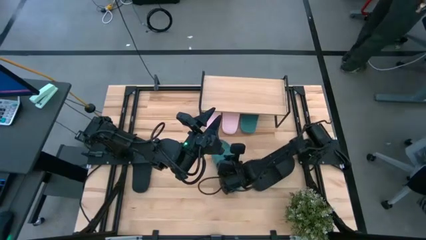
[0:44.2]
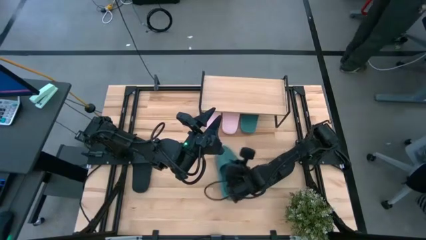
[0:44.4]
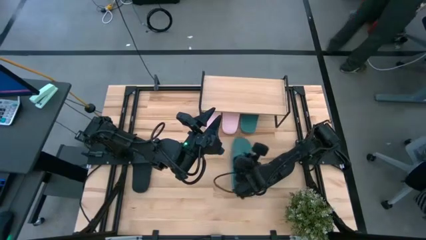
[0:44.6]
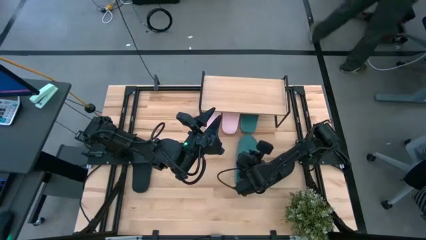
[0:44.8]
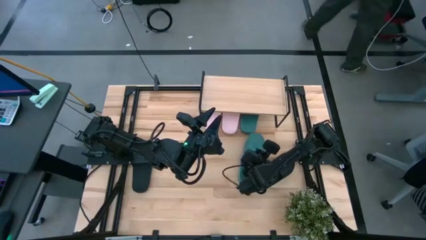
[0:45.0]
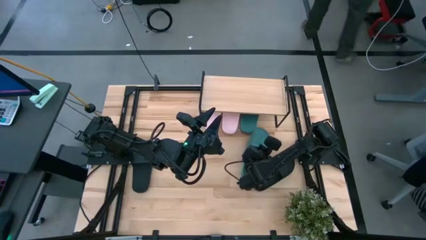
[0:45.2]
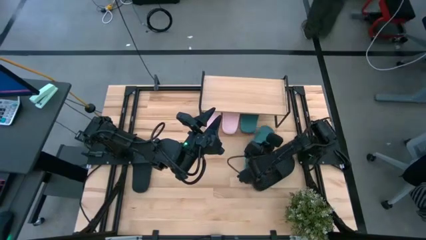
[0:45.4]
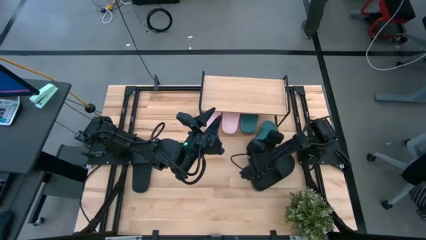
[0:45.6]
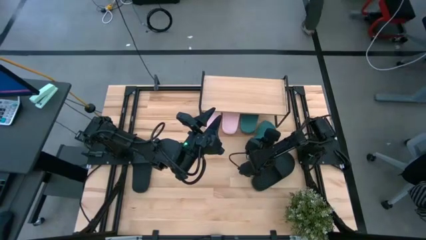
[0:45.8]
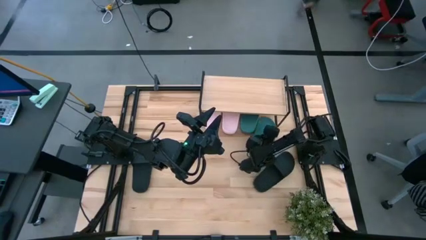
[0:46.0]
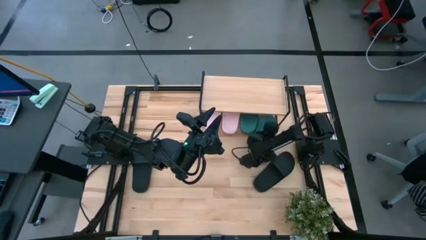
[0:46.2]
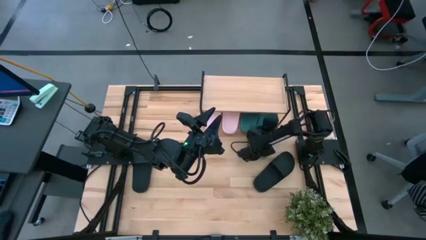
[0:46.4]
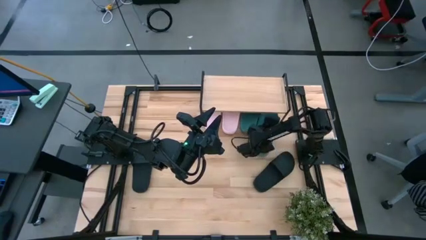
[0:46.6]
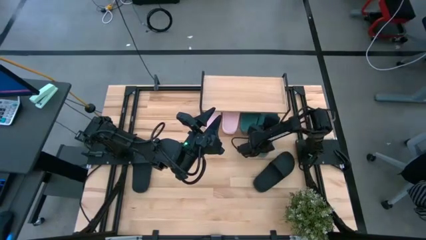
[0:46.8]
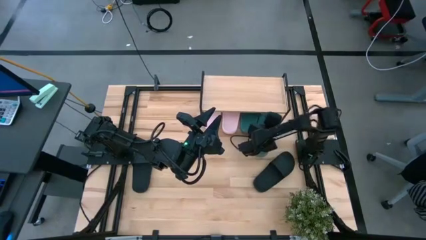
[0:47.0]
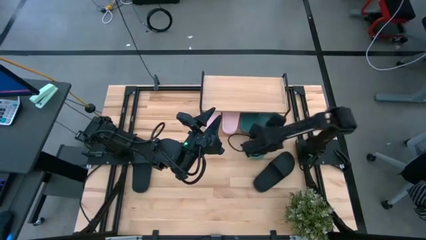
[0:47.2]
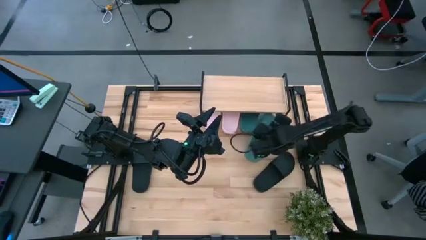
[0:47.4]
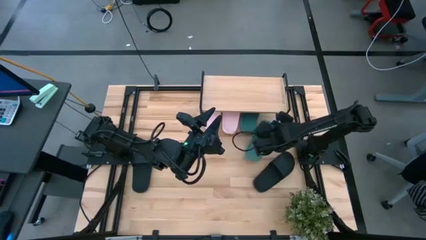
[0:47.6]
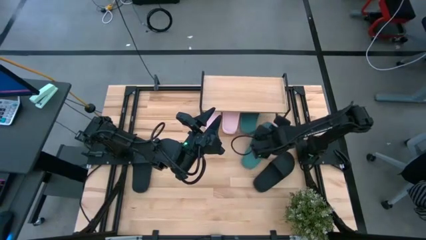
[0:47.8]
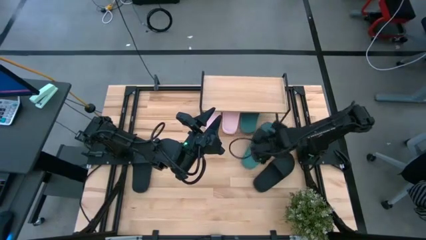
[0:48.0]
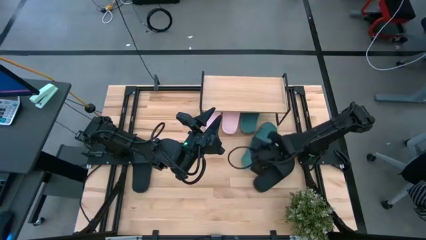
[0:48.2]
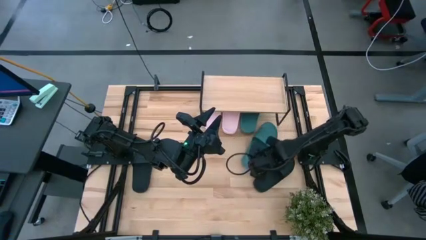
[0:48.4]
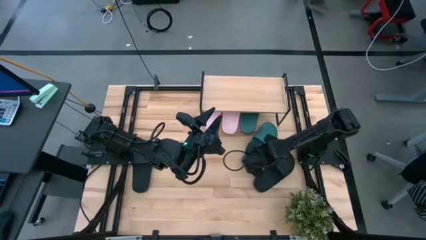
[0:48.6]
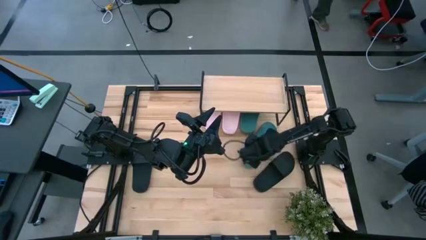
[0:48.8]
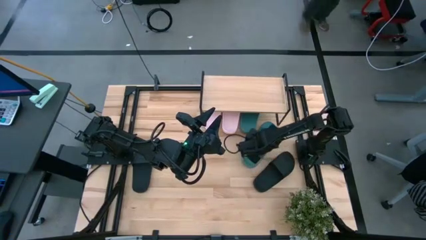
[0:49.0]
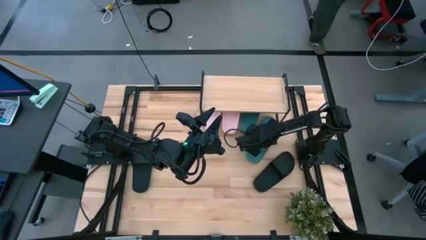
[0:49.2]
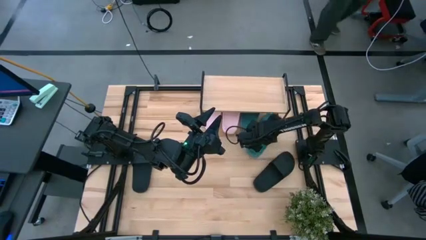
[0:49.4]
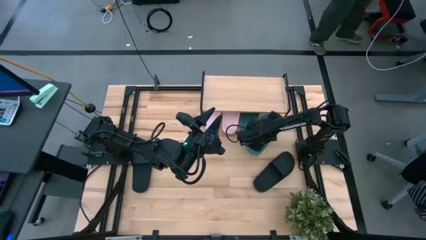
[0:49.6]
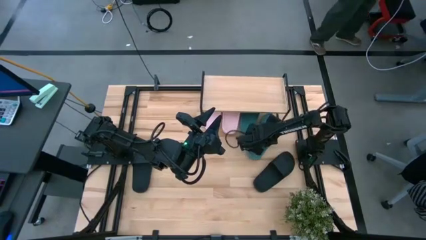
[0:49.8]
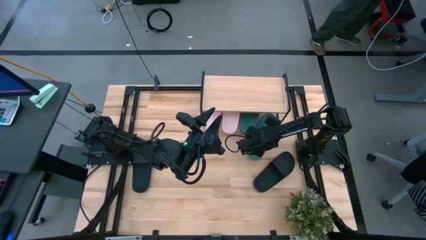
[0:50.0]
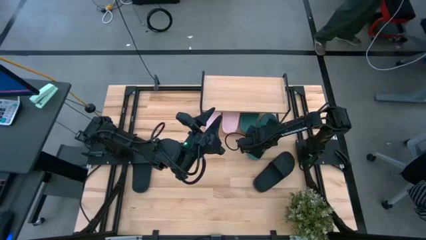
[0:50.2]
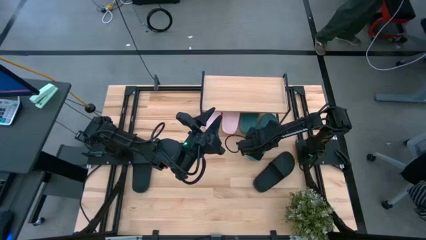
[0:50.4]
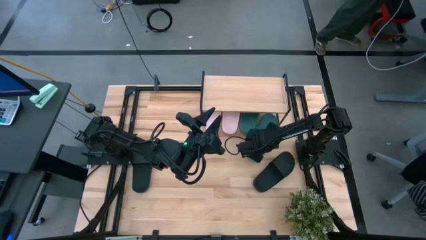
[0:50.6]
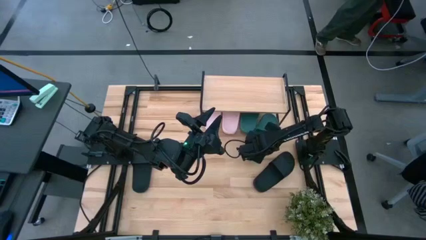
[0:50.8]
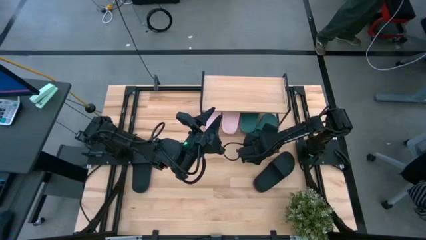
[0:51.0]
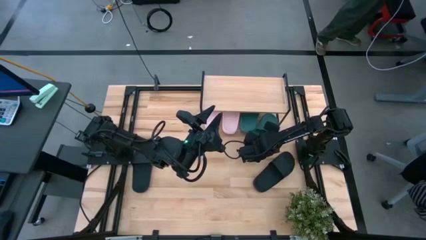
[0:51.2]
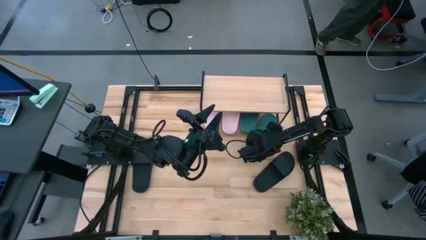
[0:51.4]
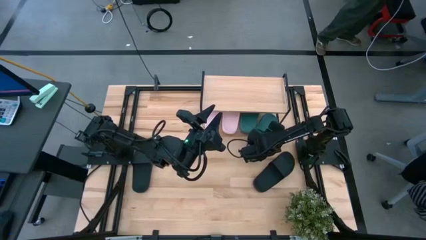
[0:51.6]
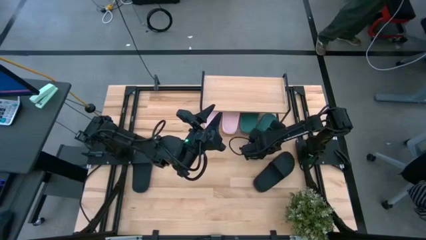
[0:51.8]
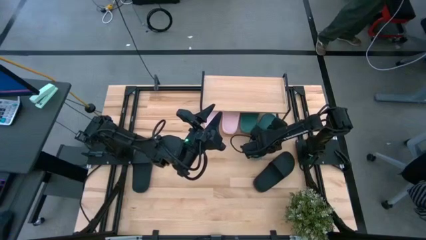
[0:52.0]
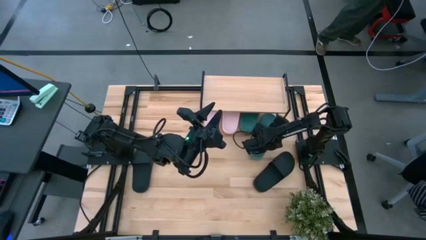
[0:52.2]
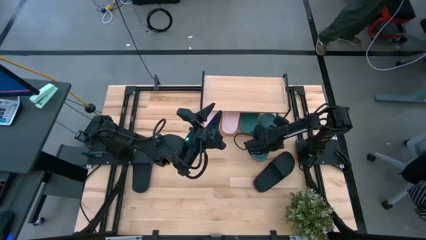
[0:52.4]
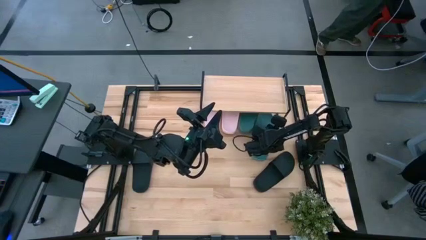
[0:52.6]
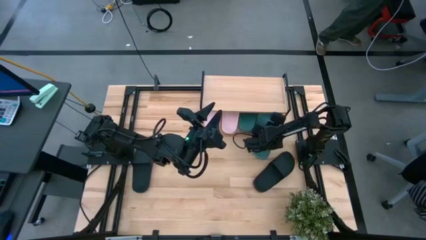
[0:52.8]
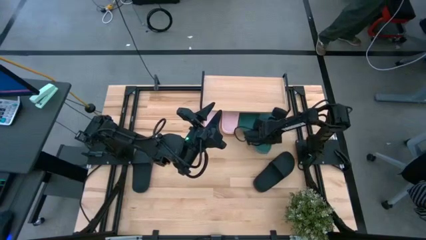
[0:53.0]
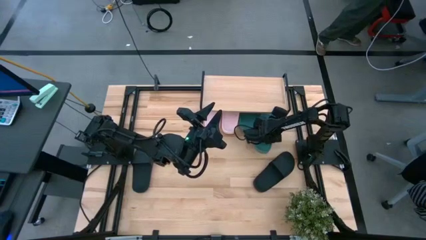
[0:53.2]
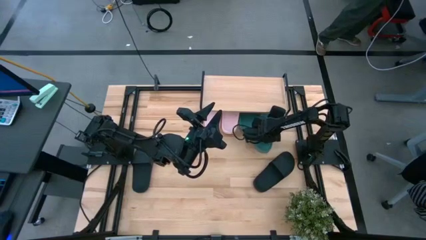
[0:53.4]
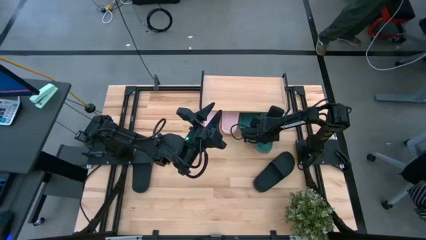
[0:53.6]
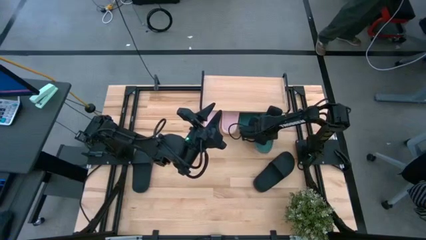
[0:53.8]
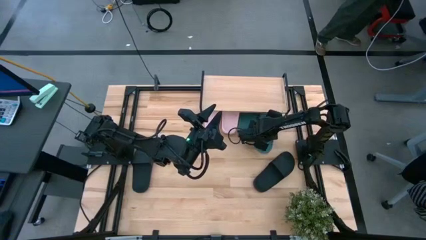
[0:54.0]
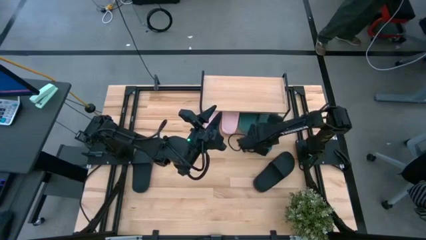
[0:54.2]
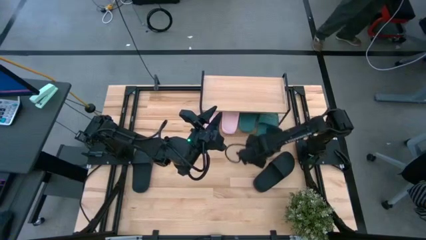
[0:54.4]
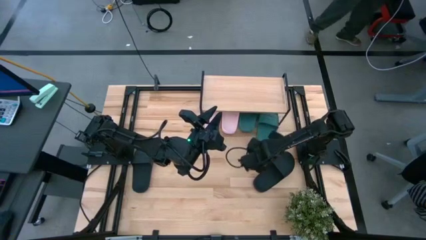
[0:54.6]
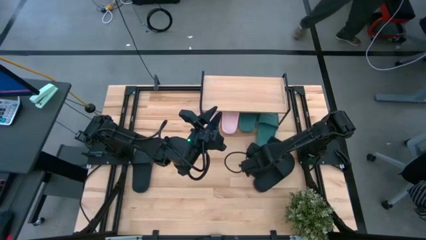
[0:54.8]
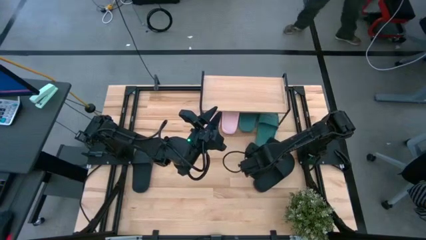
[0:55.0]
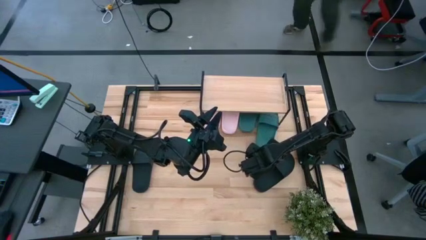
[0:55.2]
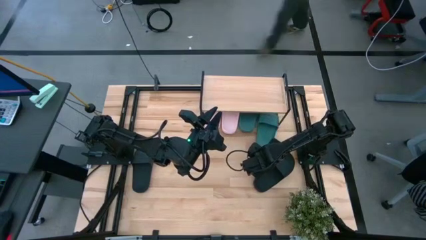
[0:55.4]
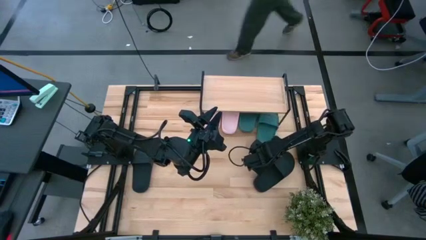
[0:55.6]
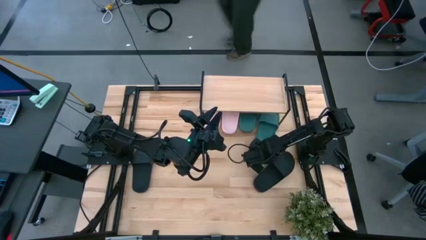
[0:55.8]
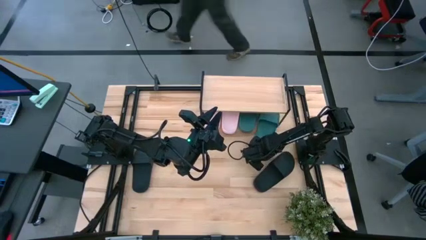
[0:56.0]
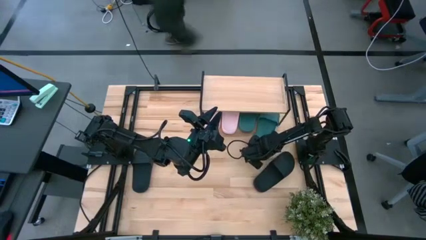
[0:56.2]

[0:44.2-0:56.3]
Task: Pick and place slides into the shelf
Put the dark green slide under the shelf

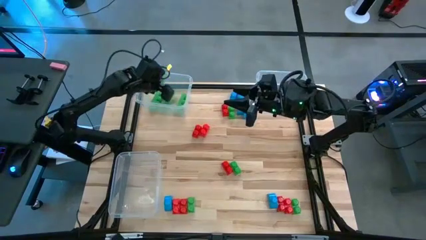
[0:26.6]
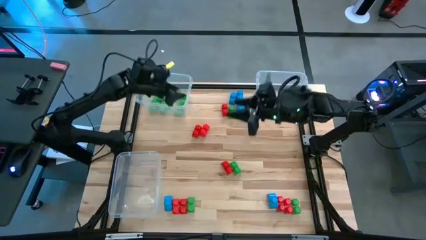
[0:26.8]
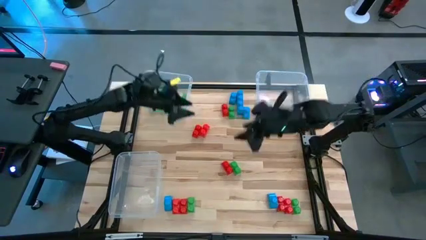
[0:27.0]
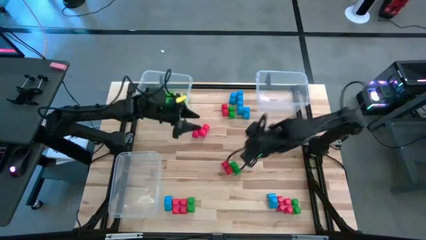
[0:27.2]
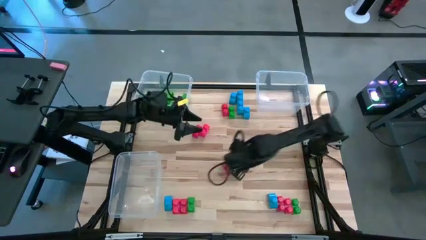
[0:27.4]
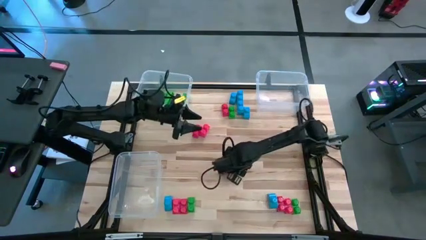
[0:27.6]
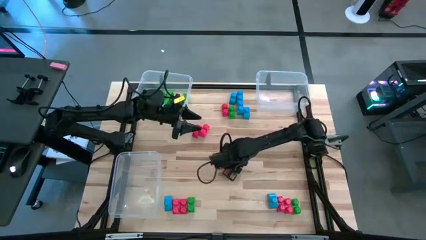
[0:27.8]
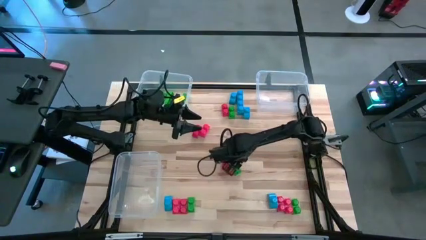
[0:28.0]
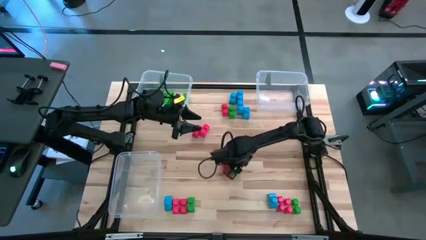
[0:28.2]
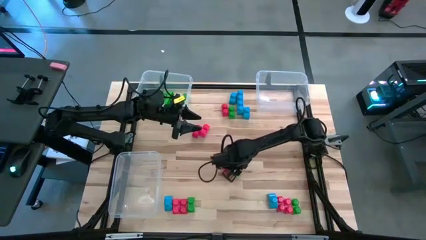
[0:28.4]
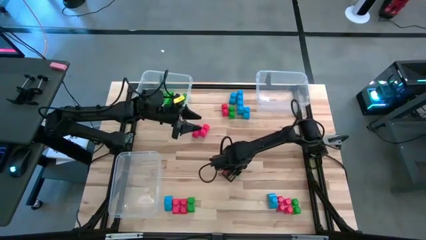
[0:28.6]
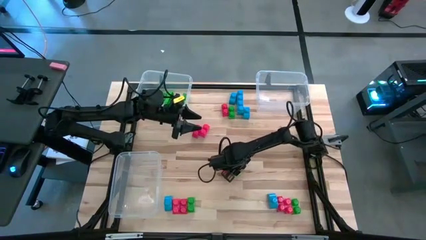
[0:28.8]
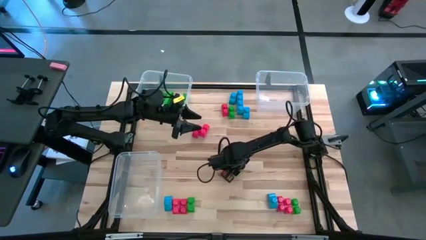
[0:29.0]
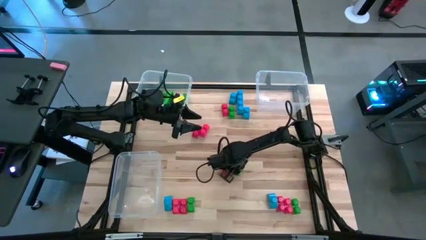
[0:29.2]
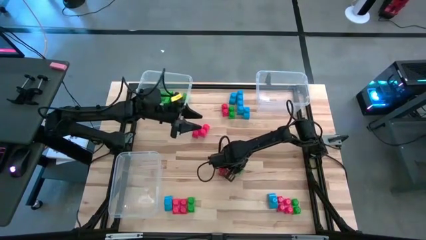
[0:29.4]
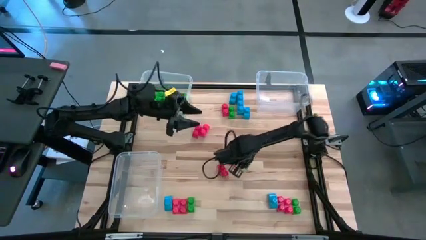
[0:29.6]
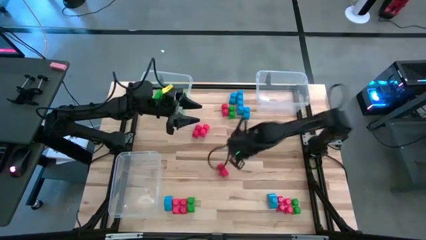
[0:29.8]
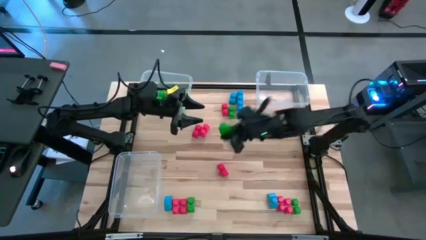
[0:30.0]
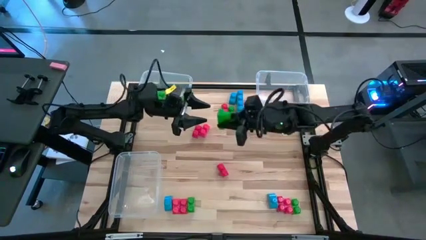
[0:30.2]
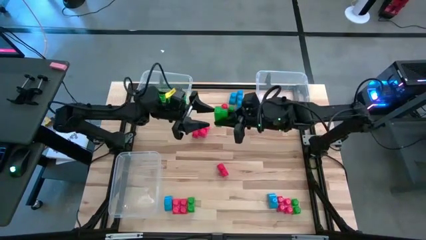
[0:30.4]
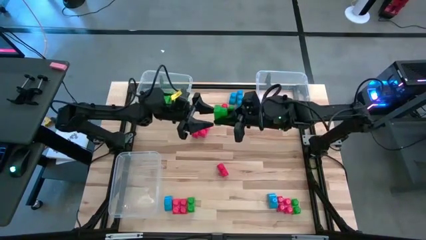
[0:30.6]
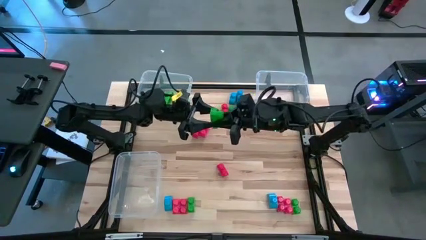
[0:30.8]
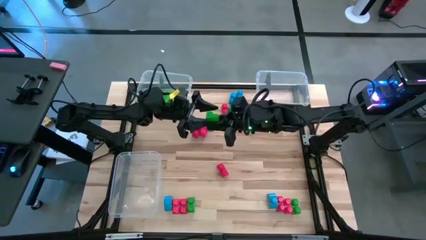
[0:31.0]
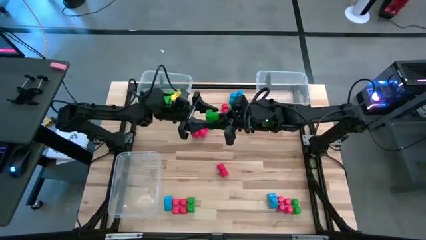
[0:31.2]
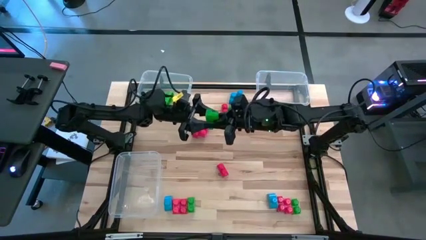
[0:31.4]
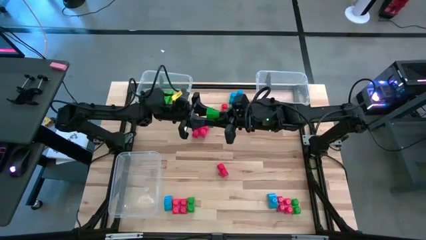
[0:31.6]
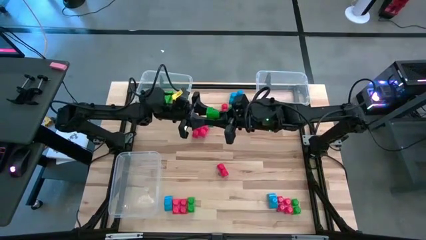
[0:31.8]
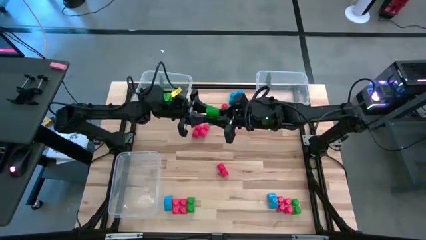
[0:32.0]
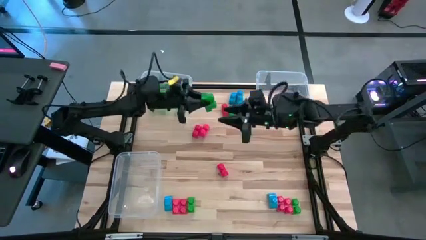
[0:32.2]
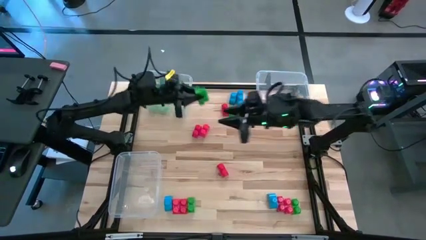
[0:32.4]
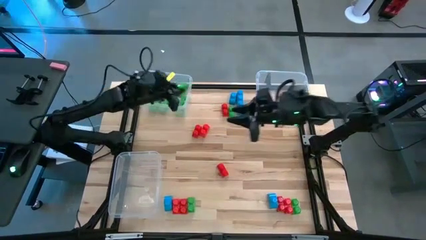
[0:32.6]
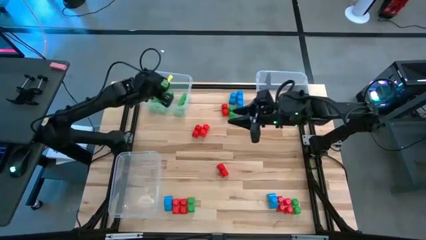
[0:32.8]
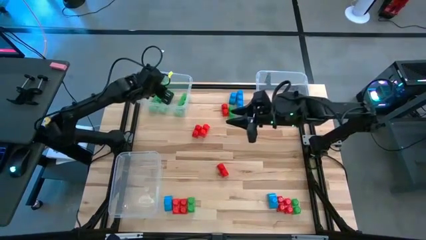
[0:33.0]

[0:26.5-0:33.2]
Task: Sort blocks
Put the green game piece into the top left transparent bin
